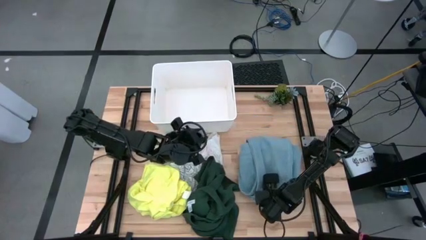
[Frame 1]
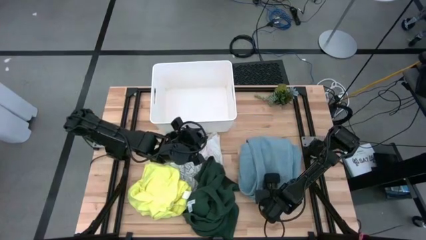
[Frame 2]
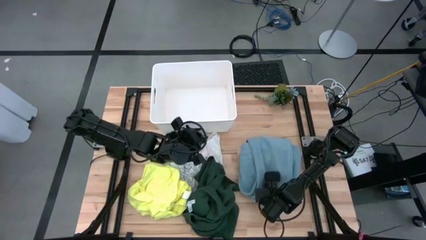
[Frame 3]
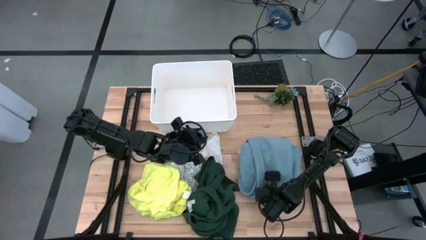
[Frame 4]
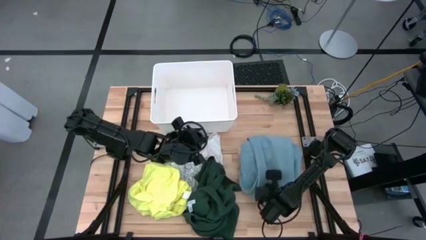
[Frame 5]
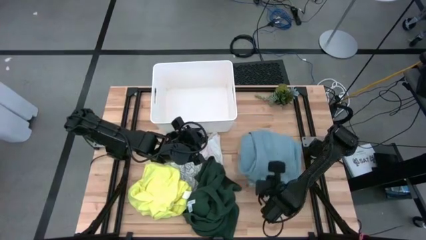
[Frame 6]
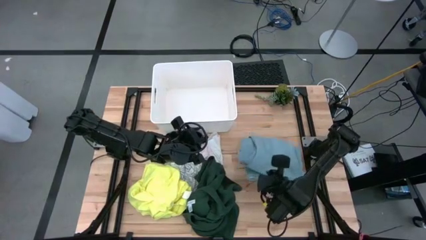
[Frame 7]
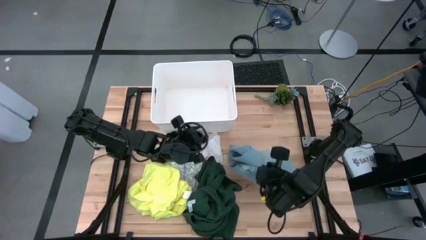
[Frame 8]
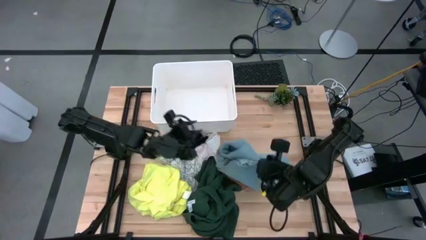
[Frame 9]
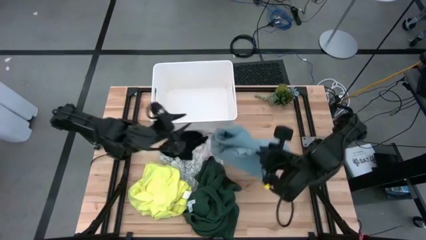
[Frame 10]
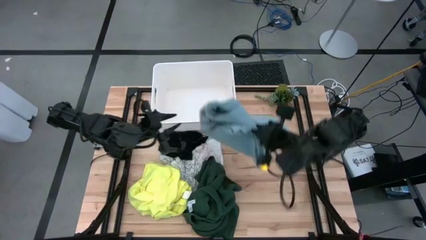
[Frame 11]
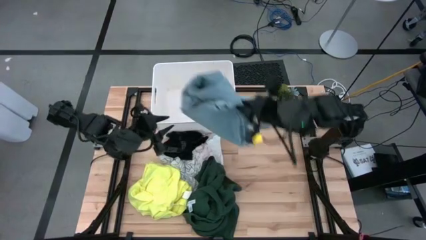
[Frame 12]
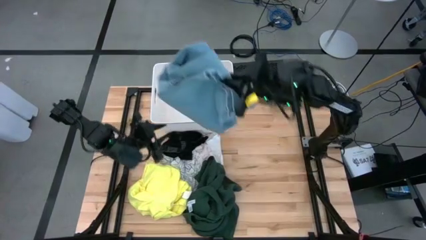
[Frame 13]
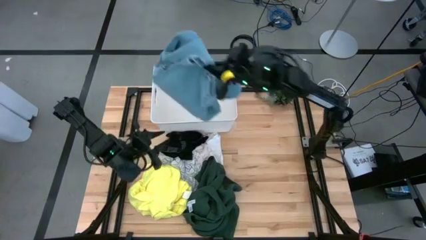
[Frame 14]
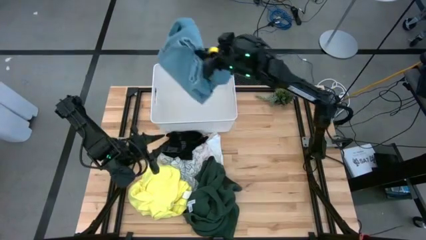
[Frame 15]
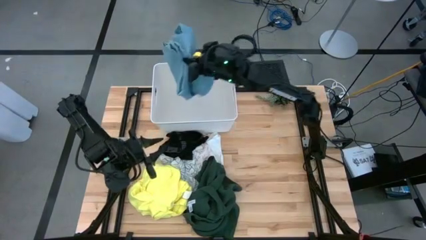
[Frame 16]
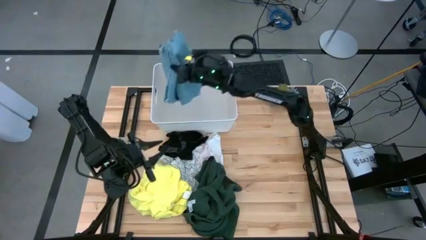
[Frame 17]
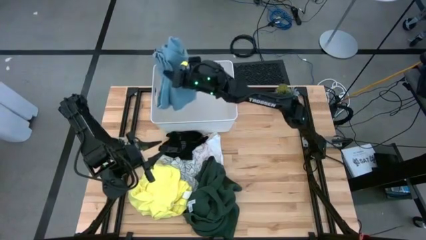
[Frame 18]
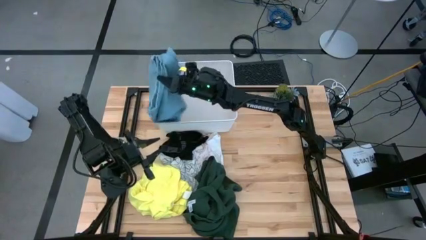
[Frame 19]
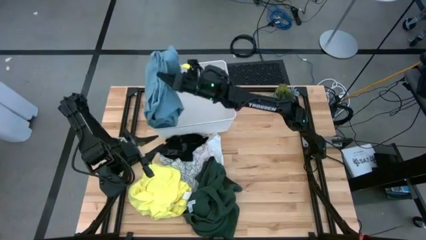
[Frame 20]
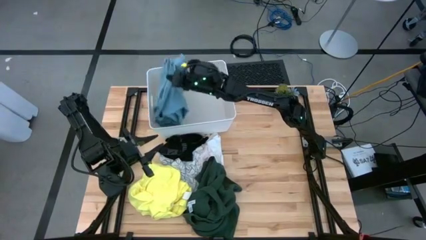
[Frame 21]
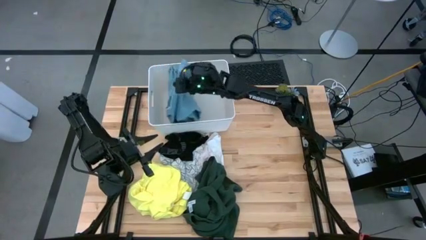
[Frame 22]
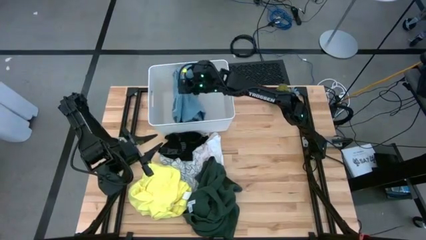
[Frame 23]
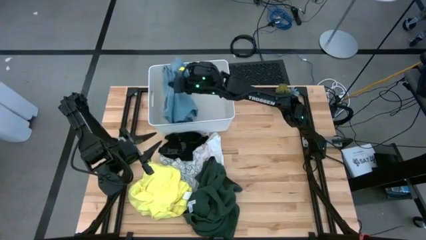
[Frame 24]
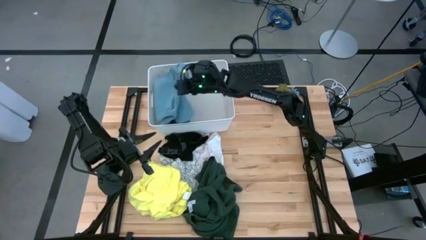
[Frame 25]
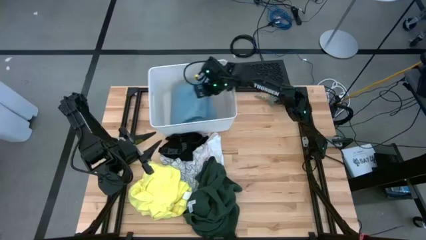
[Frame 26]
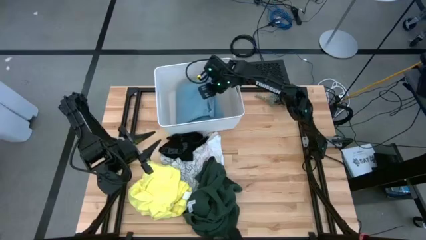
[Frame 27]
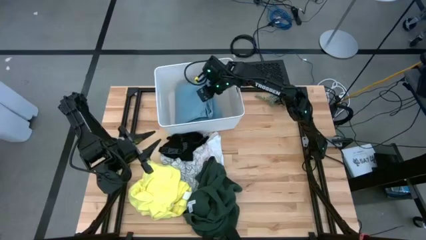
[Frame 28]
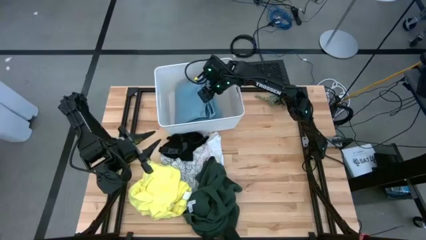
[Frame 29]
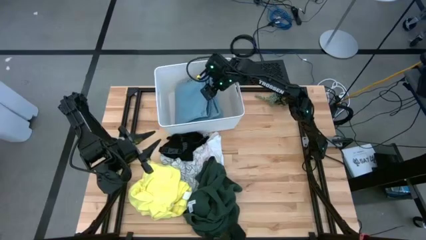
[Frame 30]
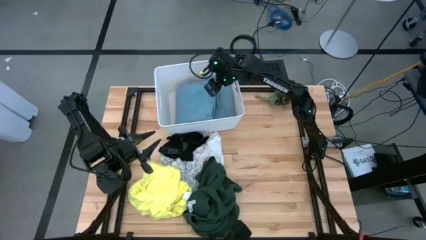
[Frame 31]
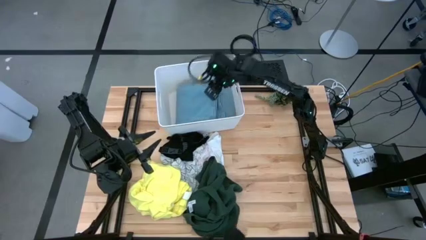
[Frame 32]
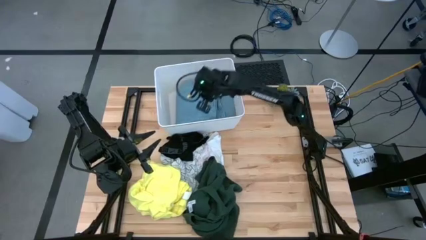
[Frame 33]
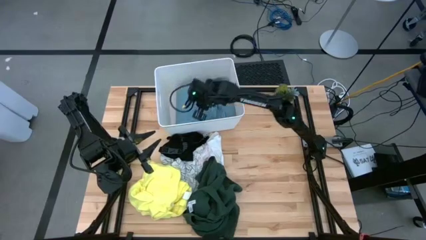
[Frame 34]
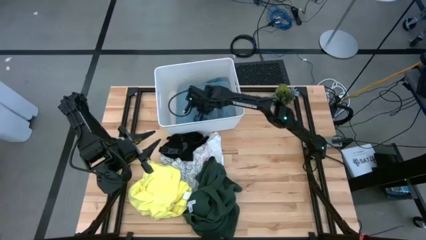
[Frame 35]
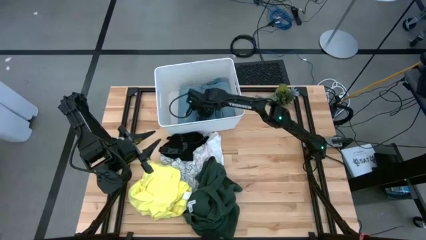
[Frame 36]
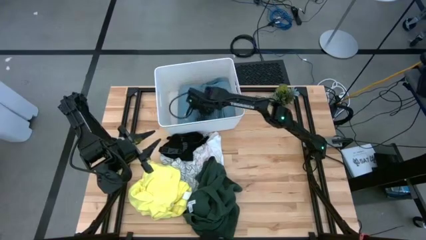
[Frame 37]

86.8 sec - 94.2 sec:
Task: Fold laundry
Put the folded denim pants into the white laundry bin

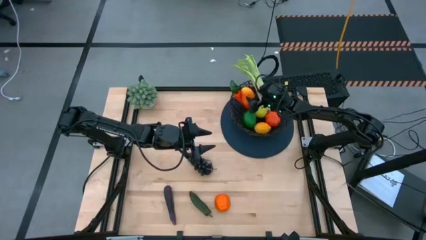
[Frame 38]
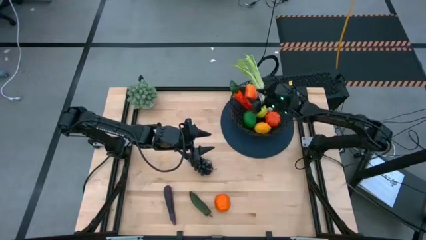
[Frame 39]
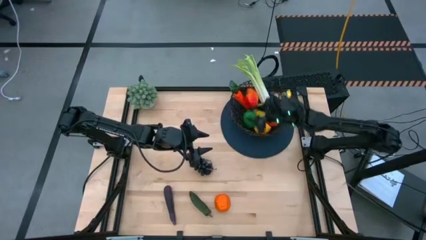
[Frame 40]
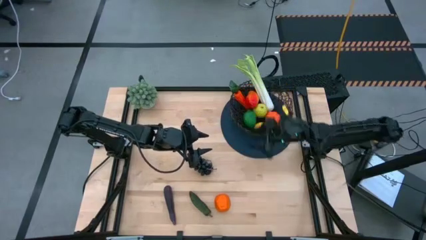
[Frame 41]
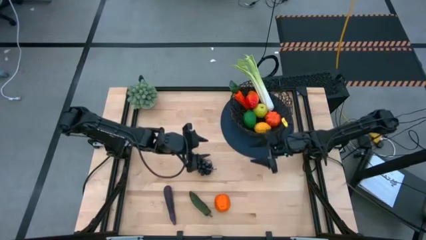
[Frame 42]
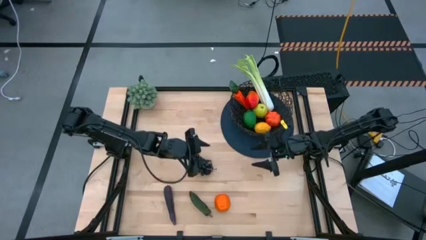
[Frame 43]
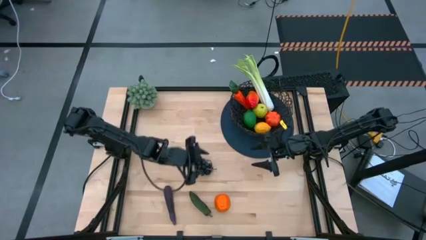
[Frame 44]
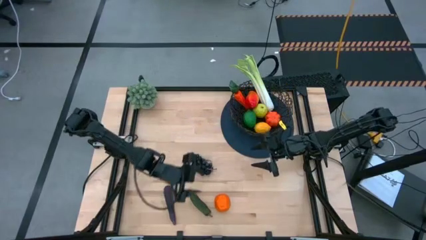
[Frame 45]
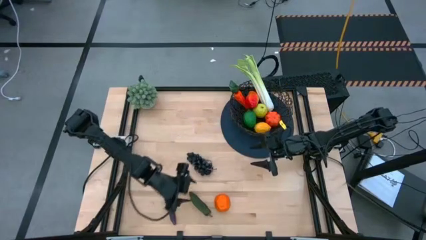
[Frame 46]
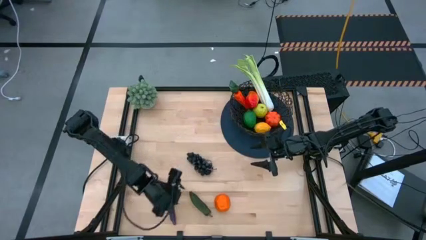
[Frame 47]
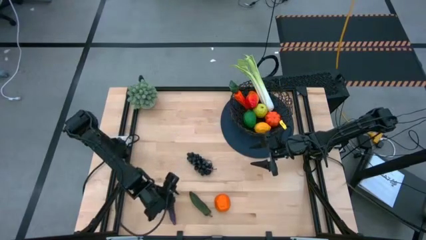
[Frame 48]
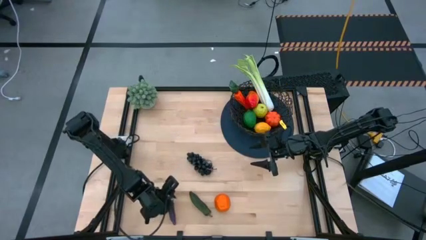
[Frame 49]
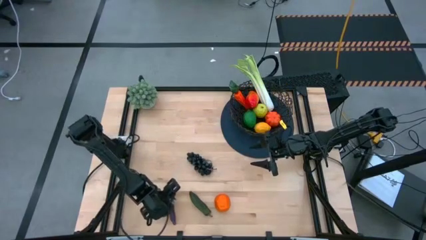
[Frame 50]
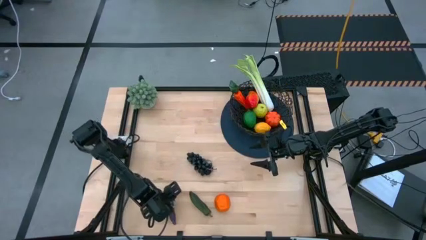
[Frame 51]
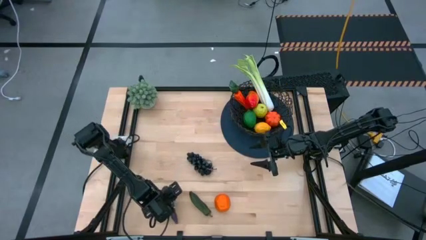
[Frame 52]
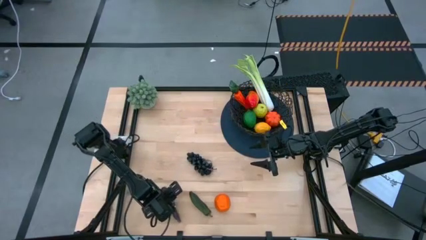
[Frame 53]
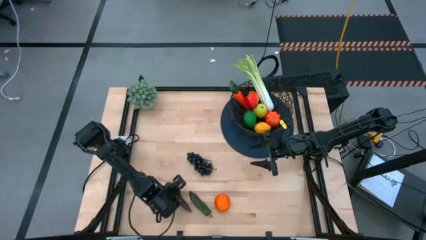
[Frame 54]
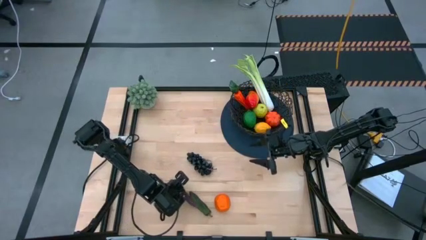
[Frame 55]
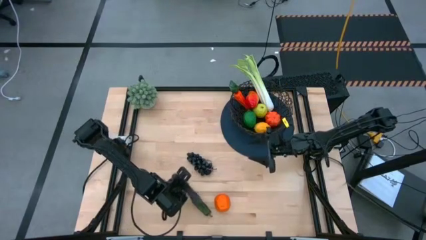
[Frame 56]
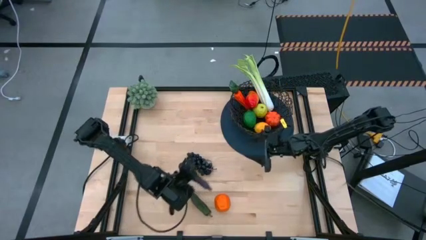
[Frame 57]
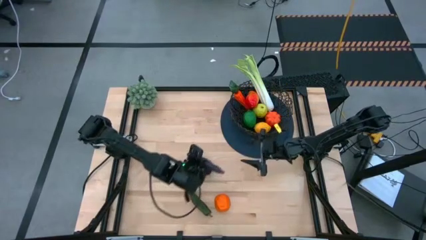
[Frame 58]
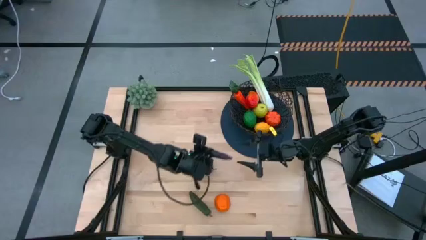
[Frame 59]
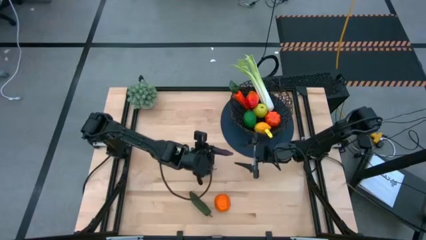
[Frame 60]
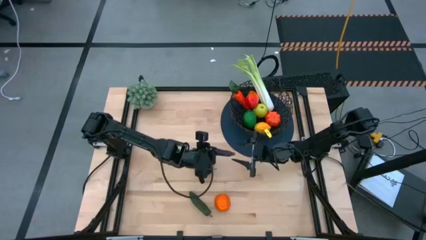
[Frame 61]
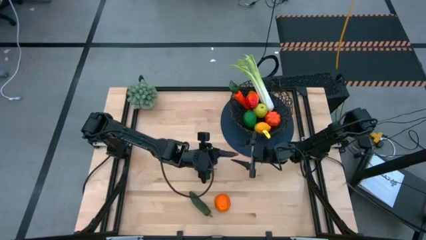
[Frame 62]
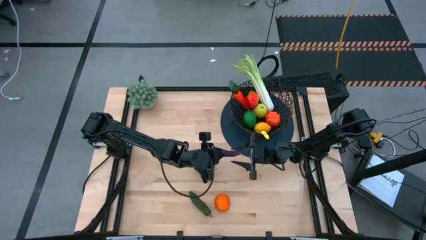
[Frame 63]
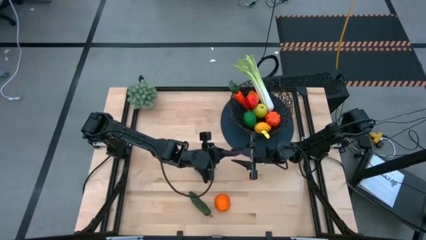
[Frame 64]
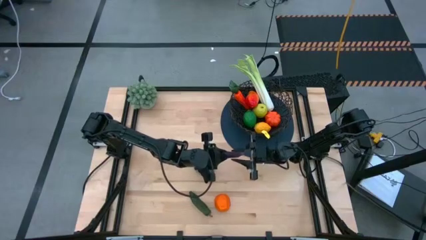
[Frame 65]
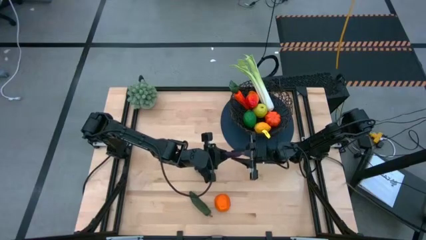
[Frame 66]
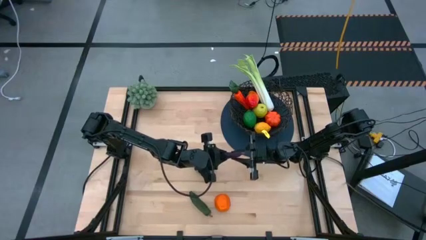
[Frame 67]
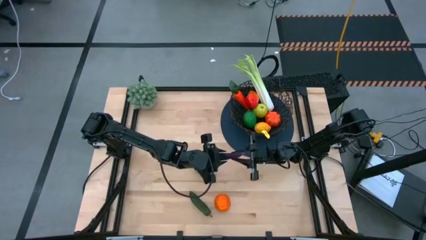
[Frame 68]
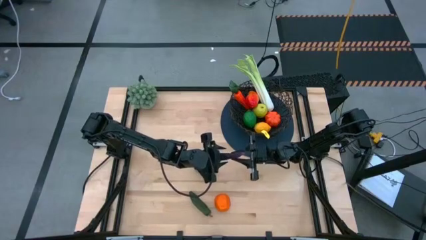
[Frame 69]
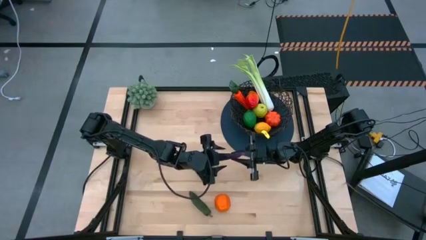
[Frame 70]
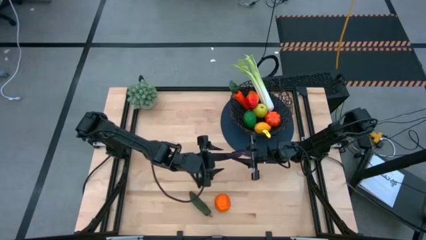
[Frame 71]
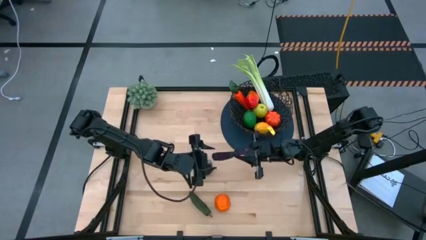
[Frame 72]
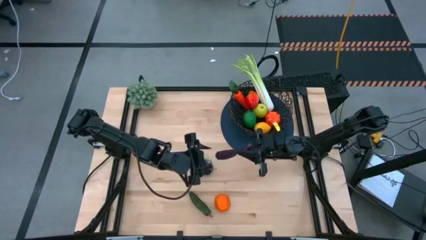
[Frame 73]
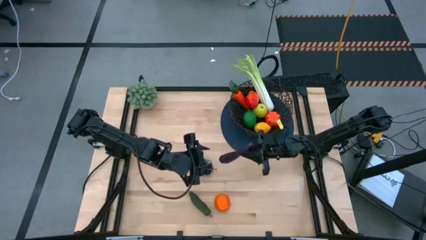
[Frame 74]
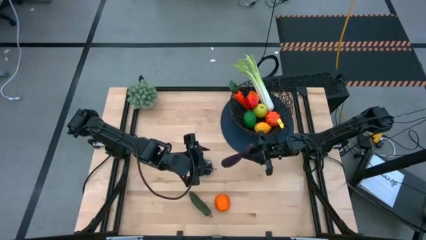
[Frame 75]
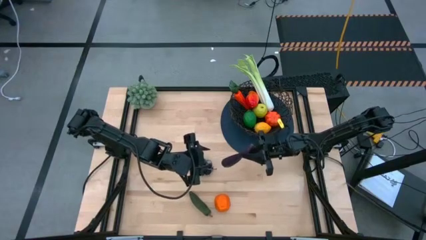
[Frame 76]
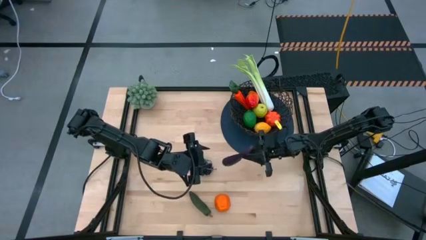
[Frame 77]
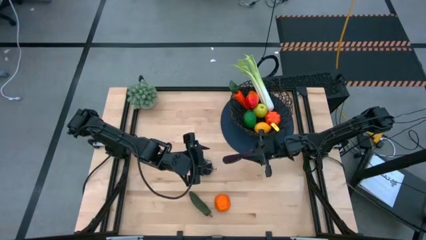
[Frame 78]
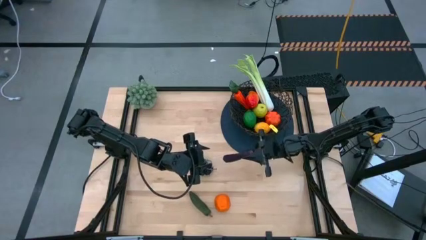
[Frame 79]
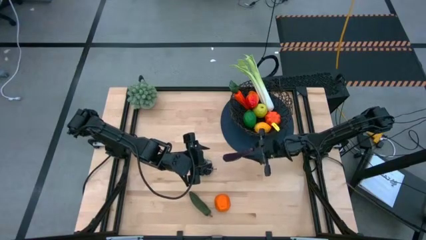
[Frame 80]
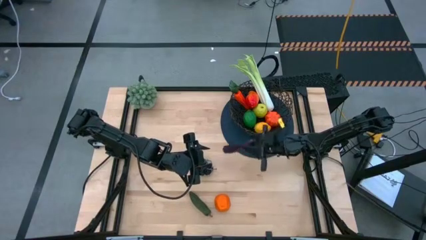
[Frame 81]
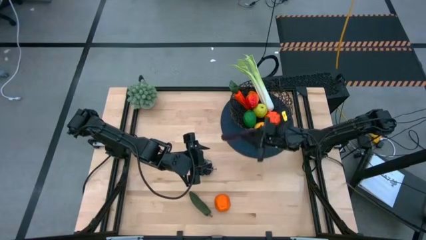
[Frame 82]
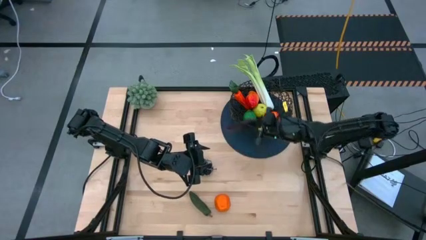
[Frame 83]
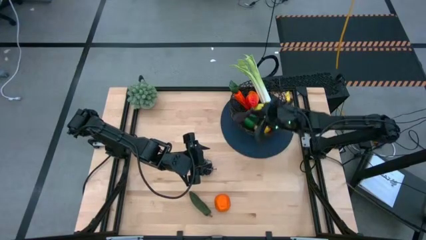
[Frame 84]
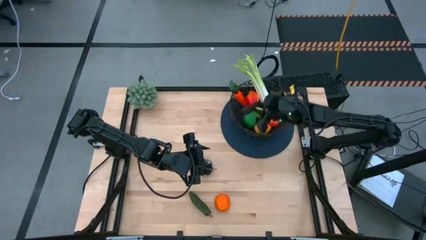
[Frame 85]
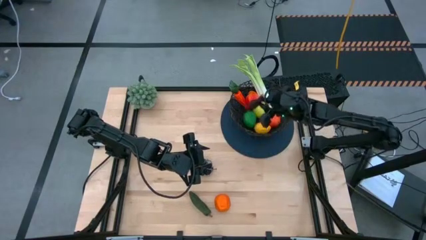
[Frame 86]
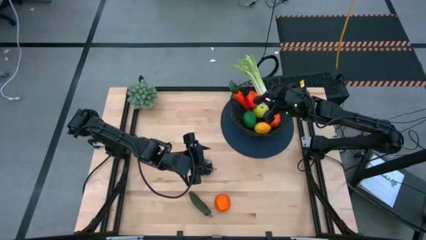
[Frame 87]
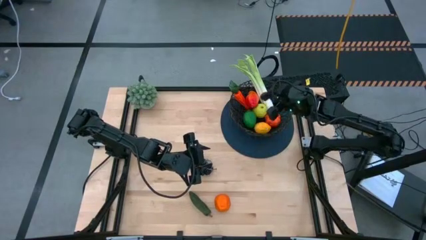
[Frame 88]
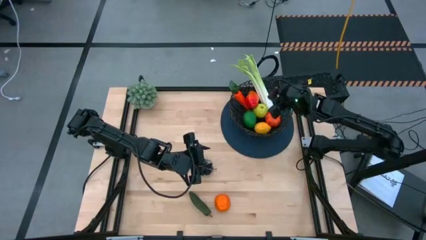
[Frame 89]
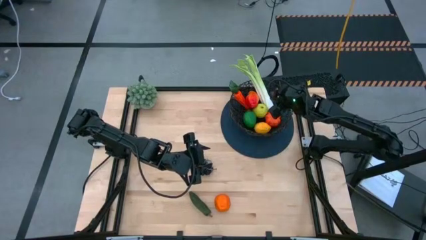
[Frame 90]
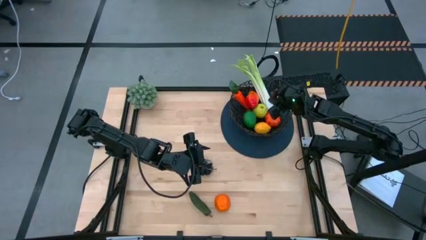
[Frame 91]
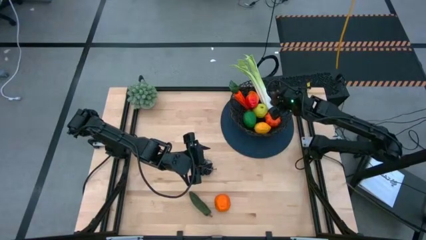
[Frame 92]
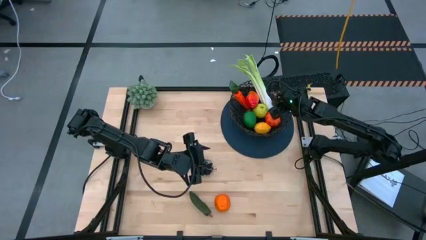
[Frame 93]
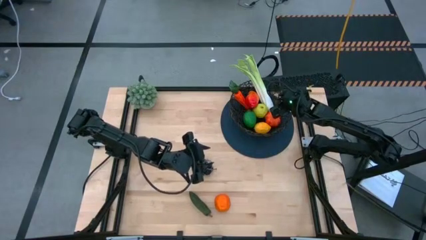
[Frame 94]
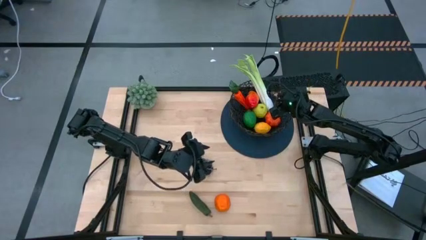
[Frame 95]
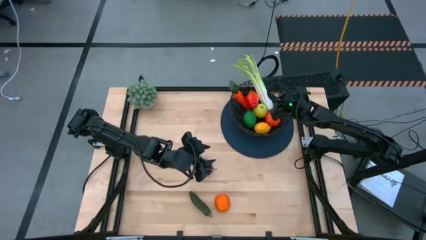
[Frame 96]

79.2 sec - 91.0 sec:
Task: Build produce basket
Put the purple eggplant into the black wire basket
